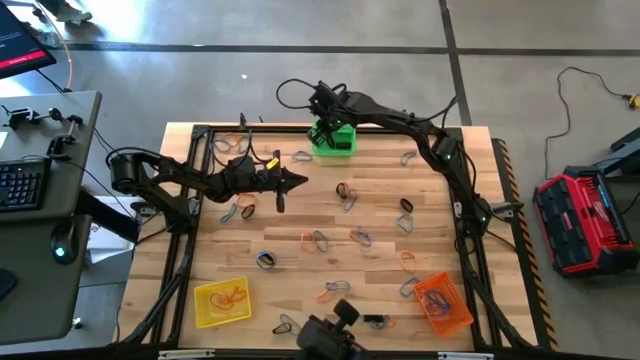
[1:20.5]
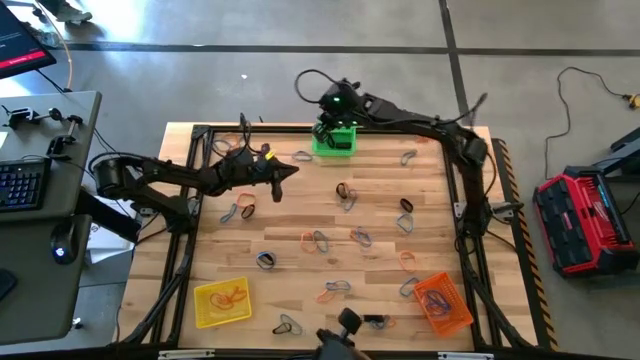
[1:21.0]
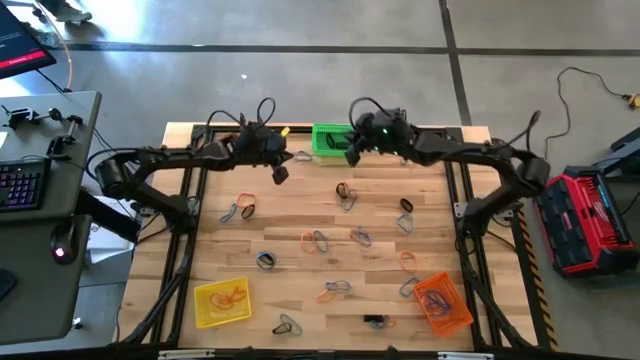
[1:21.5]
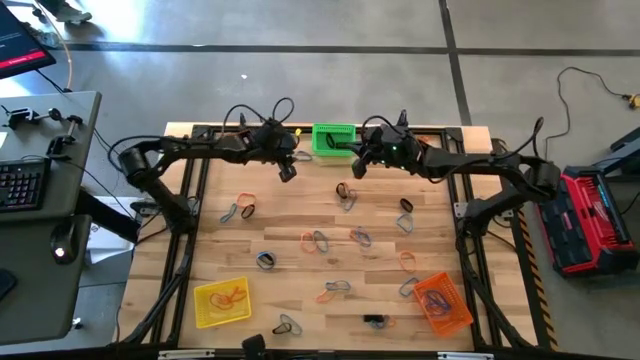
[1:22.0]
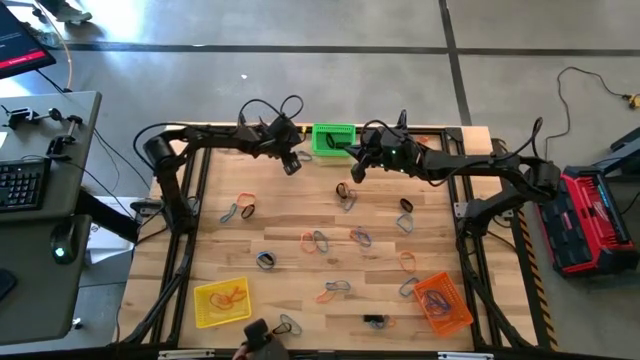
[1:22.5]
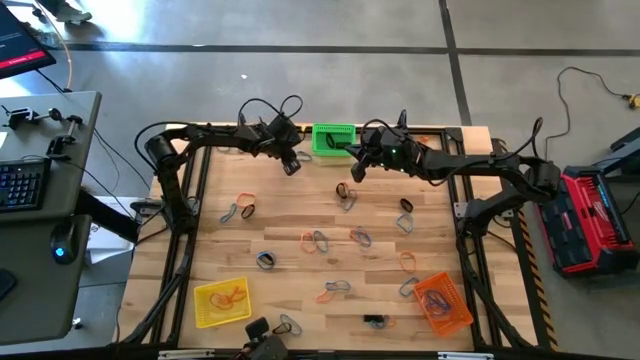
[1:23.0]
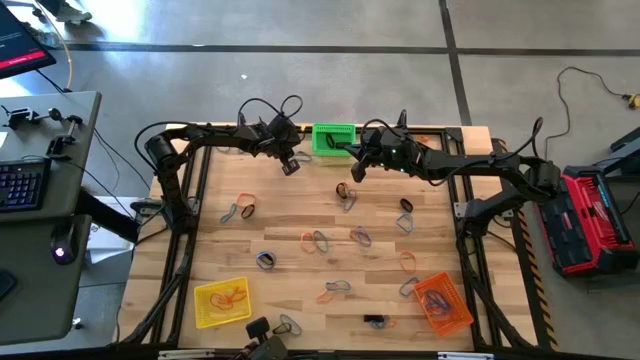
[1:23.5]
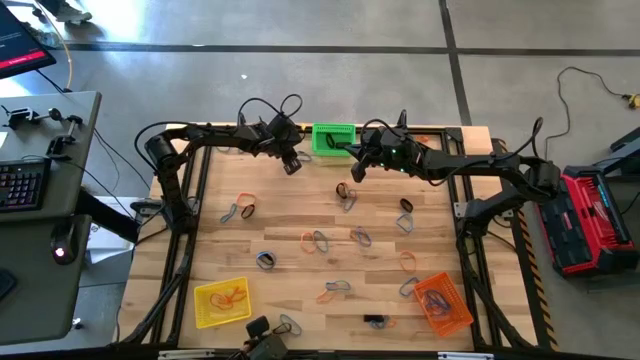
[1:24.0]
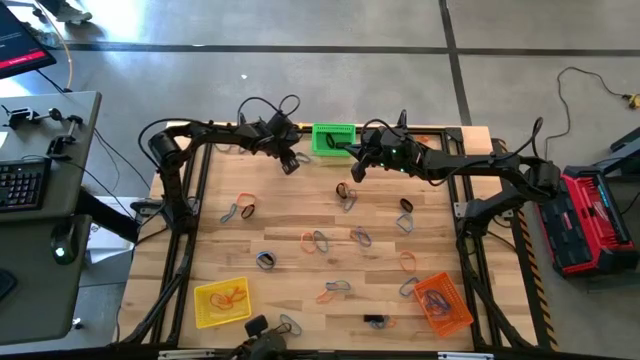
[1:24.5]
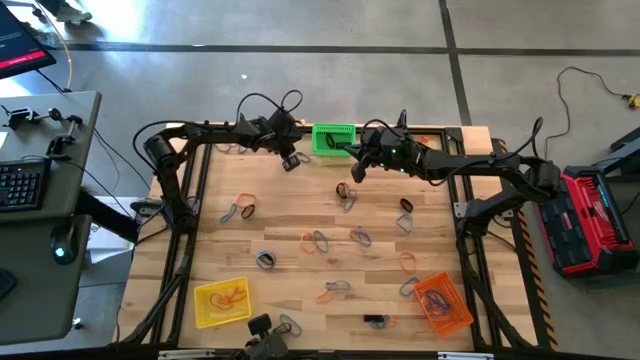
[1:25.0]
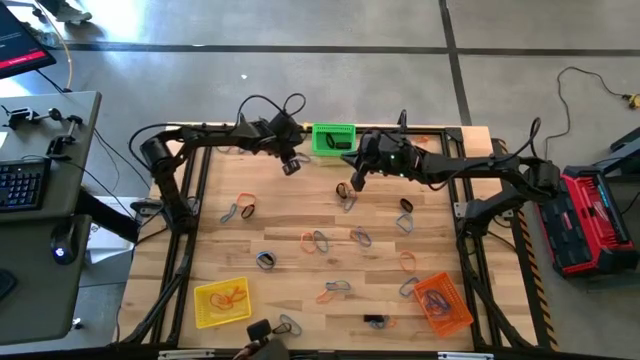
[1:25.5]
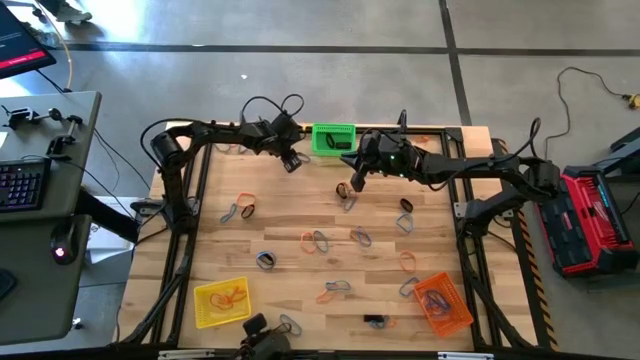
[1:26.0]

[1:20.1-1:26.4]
Task: Sort rubber bands into baskets
Put the blue rubber band into the orange bin

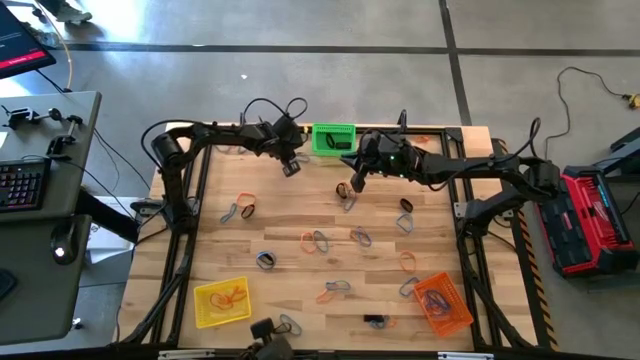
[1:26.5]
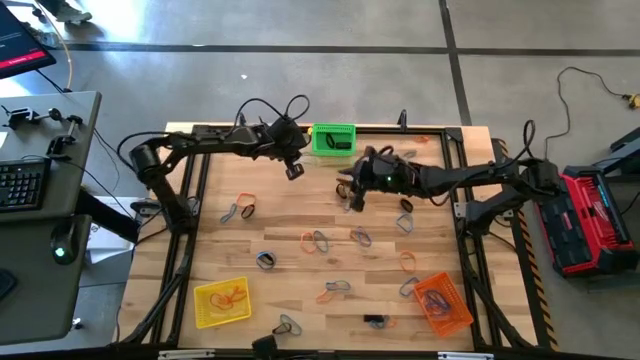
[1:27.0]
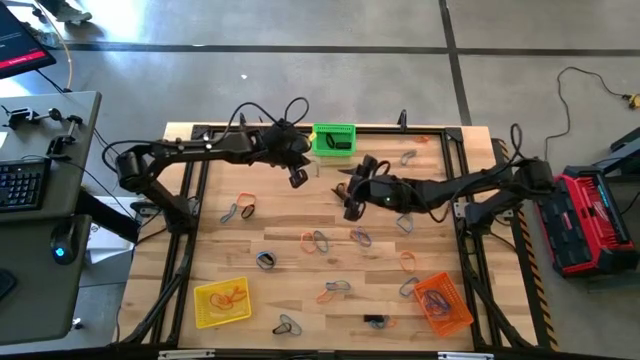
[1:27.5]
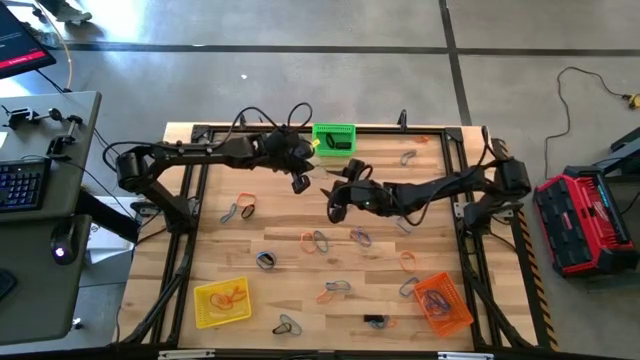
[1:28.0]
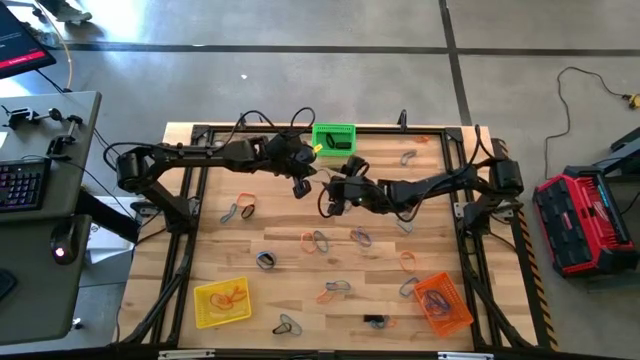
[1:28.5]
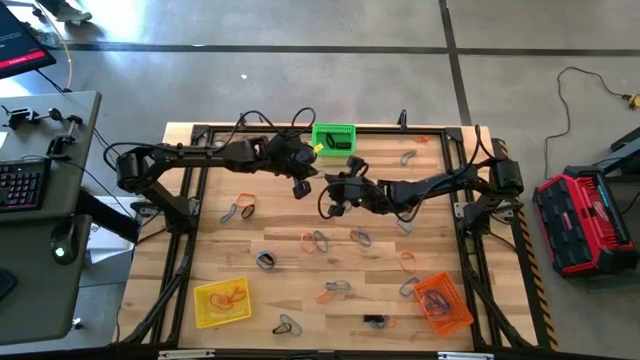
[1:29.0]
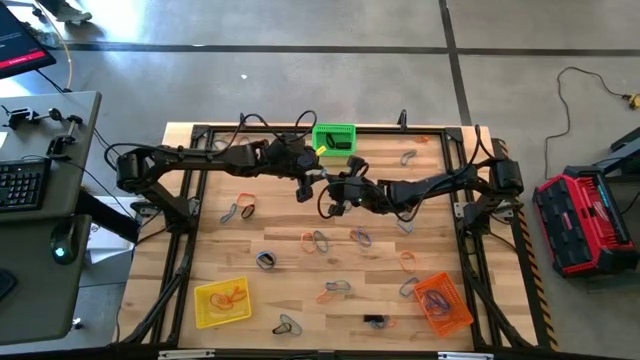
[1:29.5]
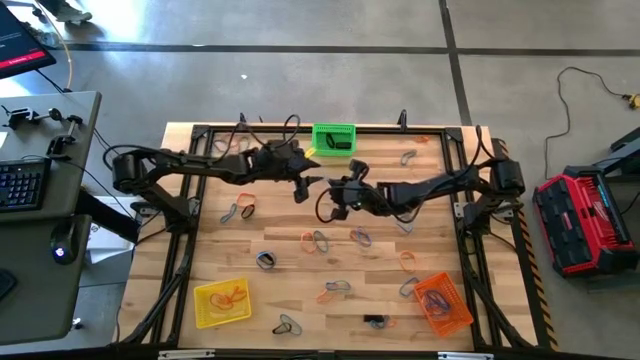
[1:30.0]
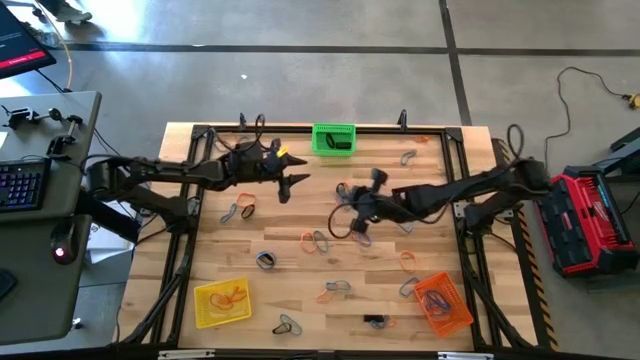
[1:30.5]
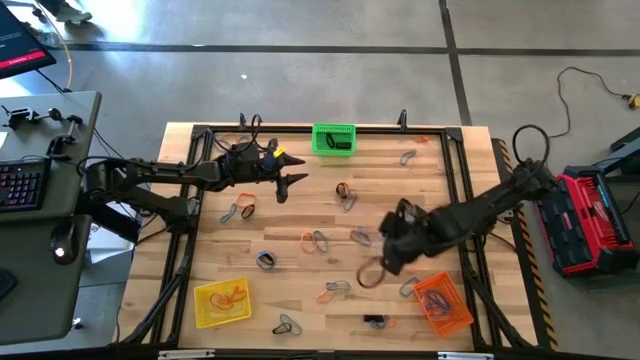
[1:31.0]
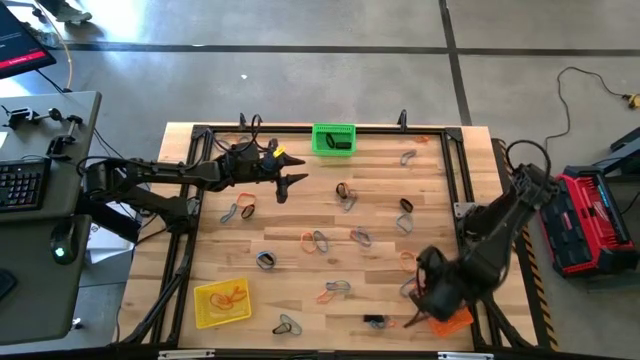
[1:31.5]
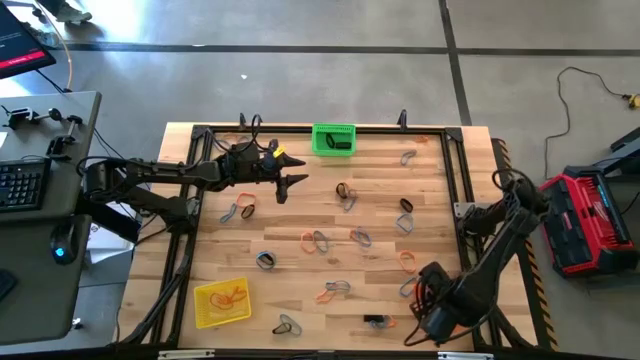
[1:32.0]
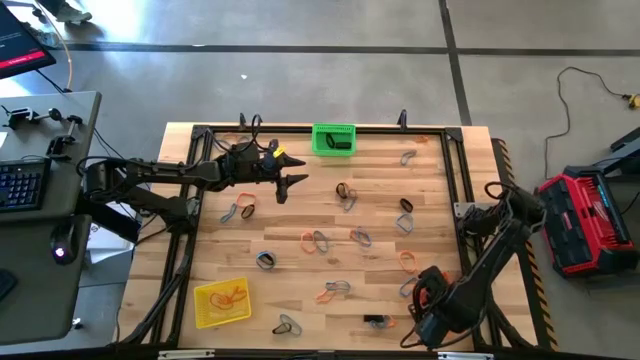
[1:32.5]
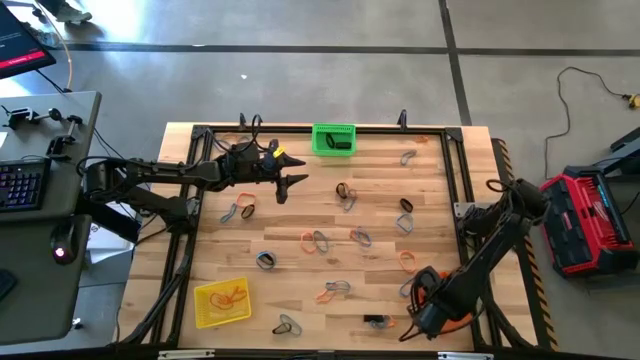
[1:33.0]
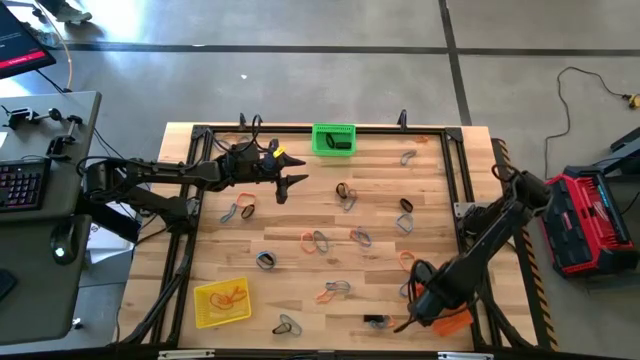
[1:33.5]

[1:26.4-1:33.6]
Put the blue rubber band into the orange bin

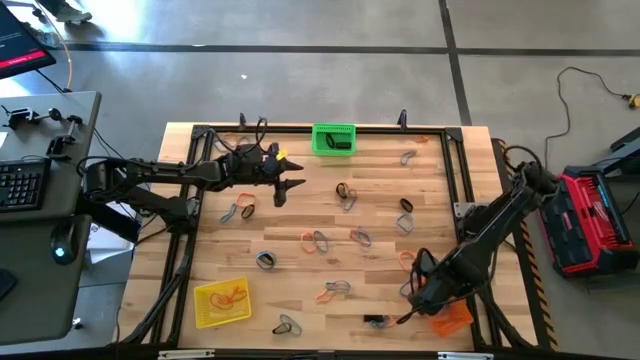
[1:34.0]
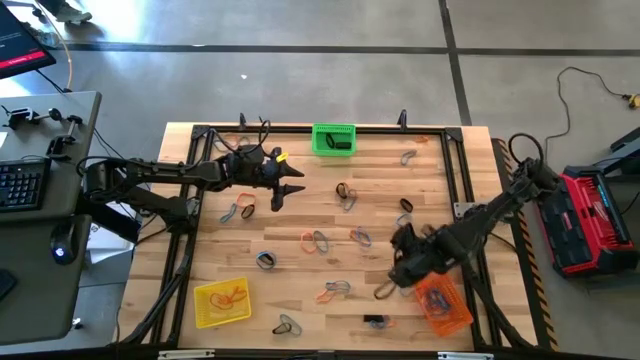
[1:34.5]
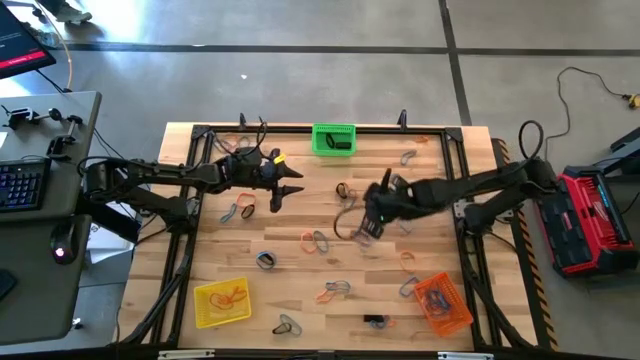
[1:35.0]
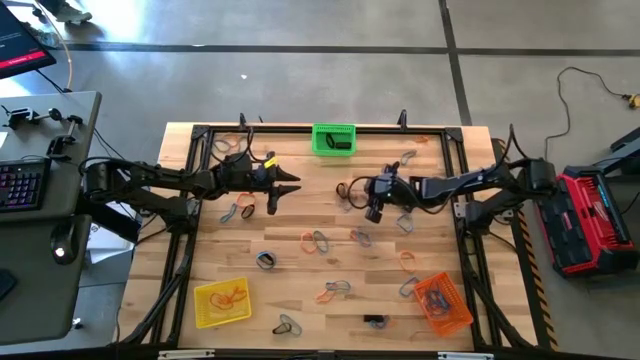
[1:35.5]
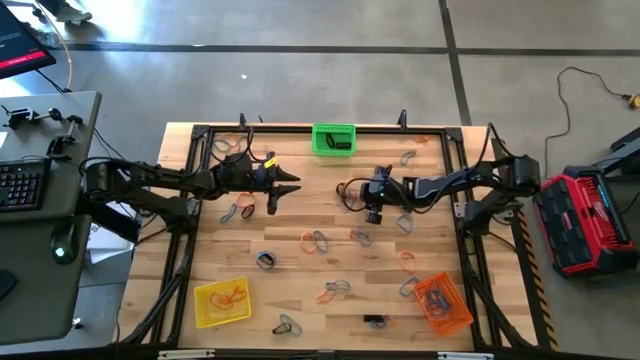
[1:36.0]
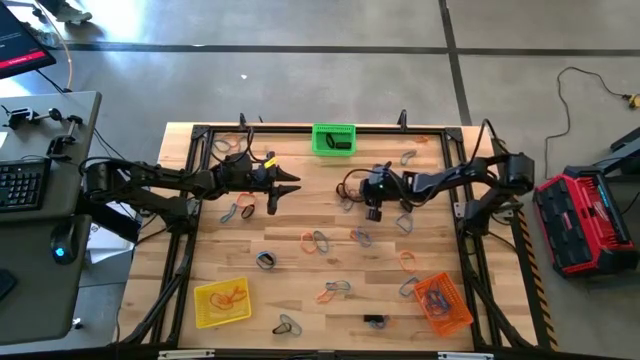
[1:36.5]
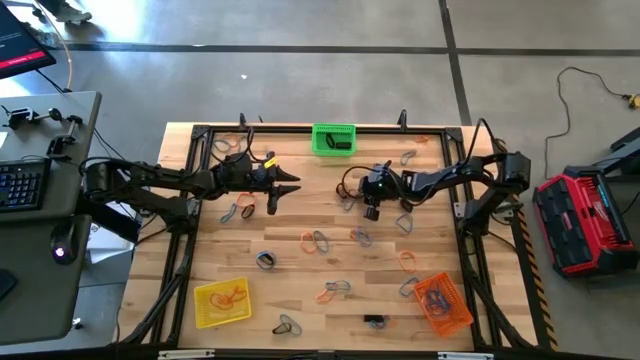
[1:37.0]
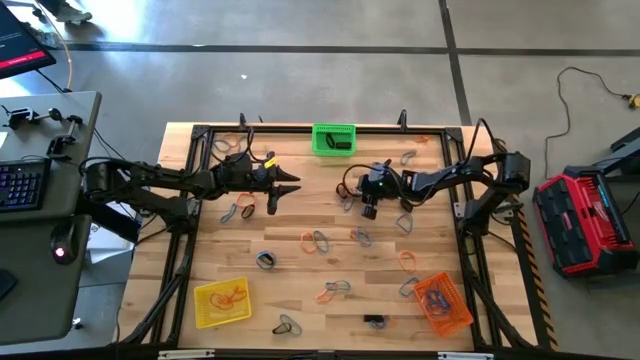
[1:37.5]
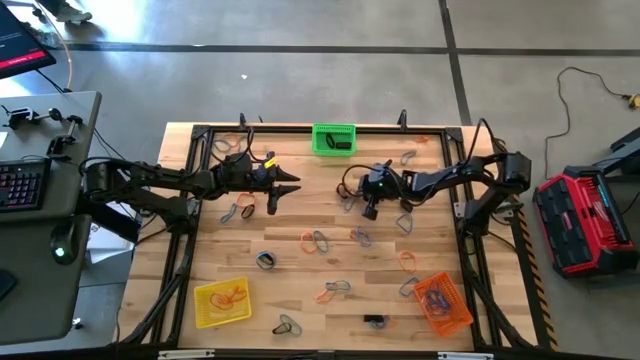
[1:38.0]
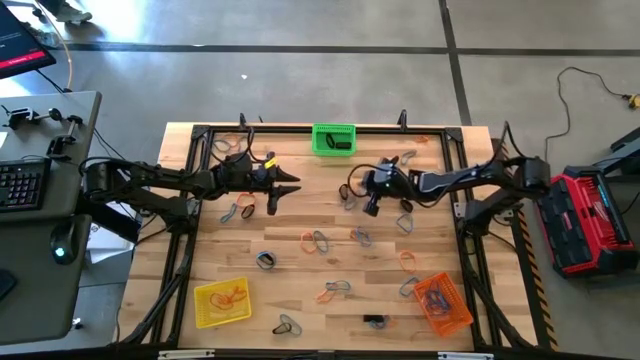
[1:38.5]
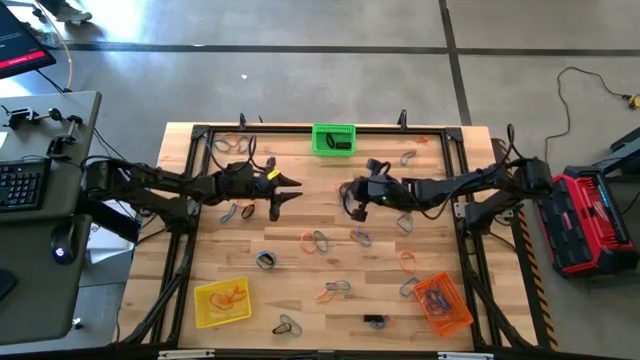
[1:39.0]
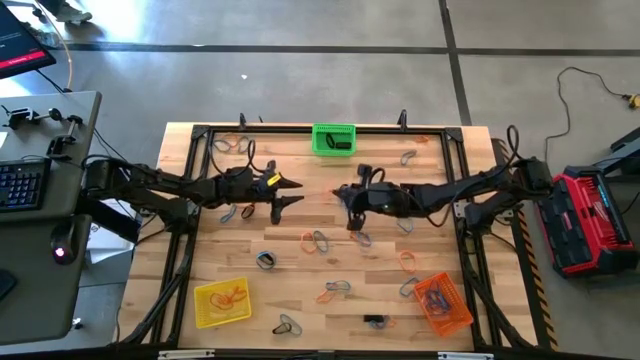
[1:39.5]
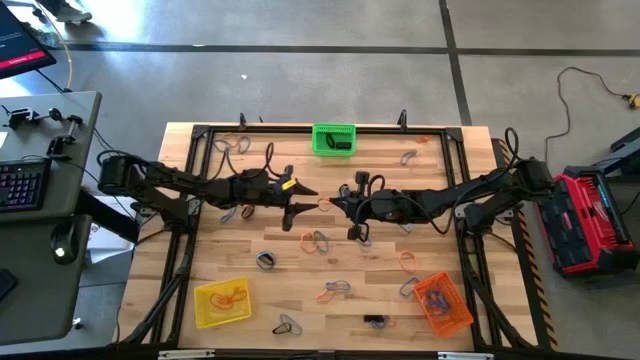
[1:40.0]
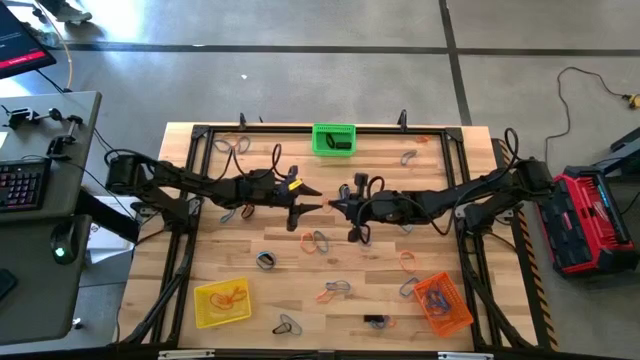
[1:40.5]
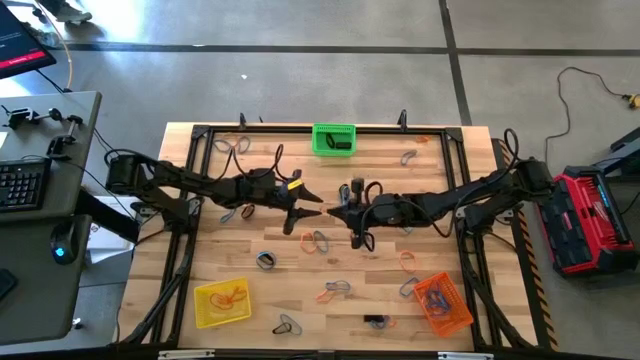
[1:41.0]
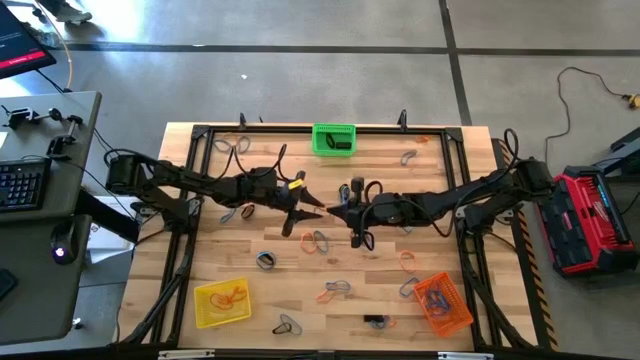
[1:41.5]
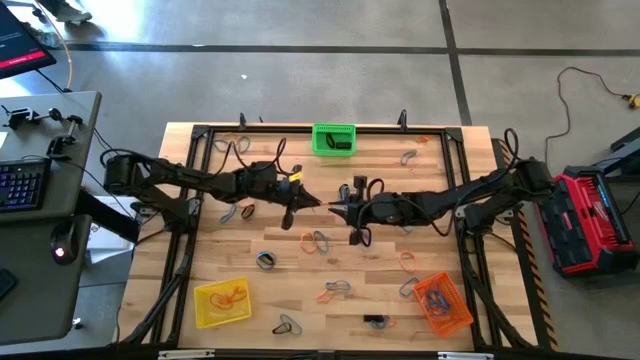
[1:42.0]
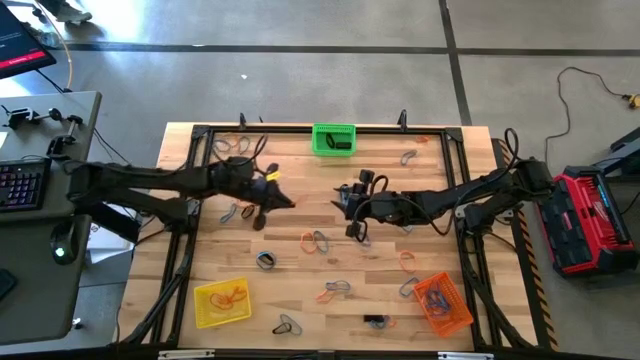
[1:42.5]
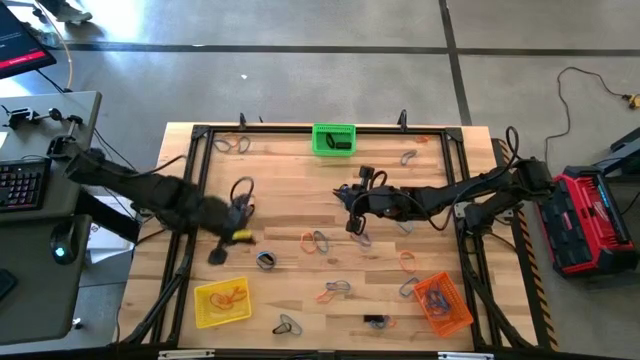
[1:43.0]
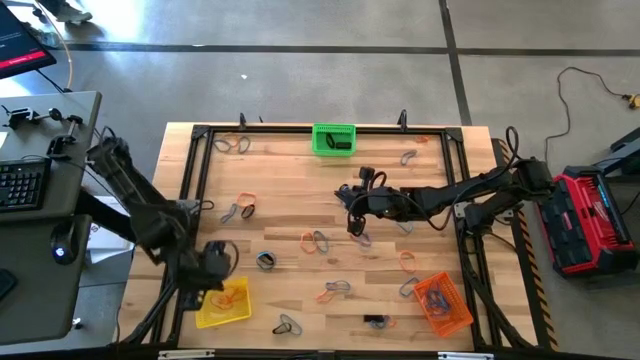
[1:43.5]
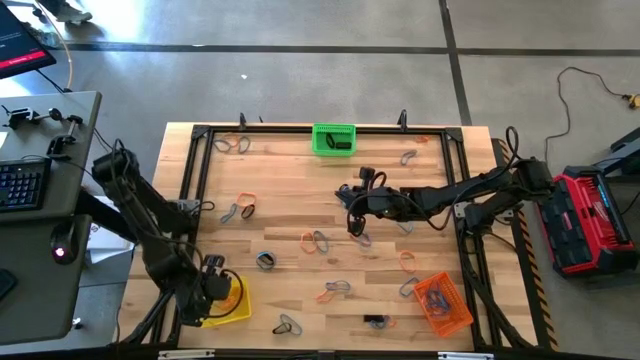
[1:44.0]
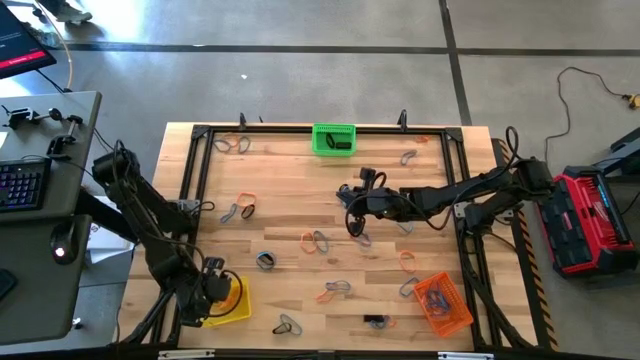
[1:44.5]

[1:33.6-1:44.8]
Put the orange rubber band into the yellow bin
